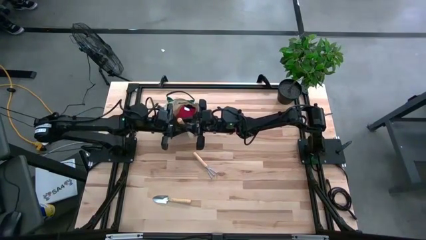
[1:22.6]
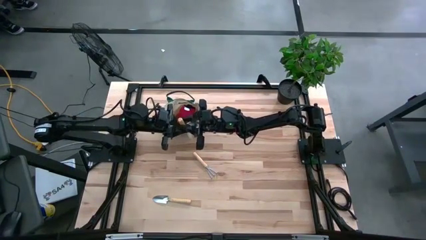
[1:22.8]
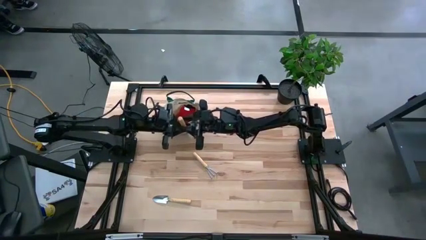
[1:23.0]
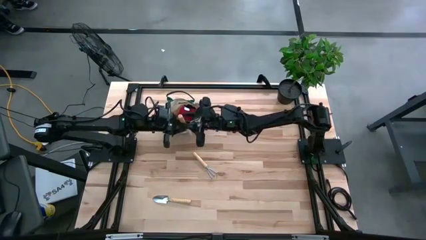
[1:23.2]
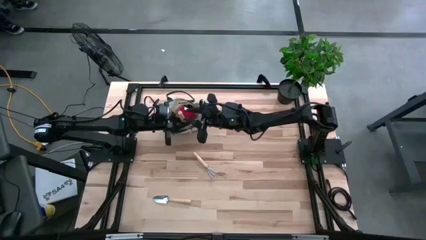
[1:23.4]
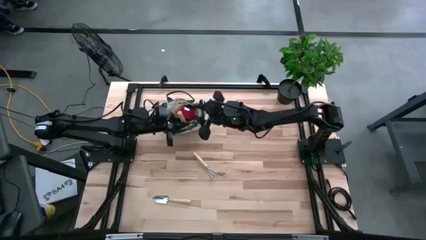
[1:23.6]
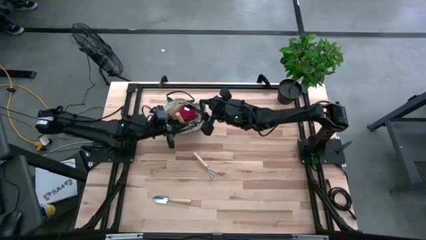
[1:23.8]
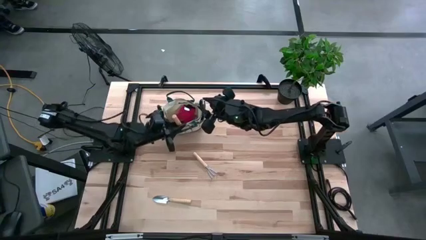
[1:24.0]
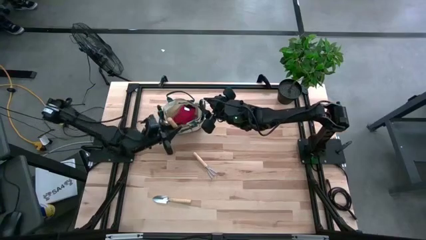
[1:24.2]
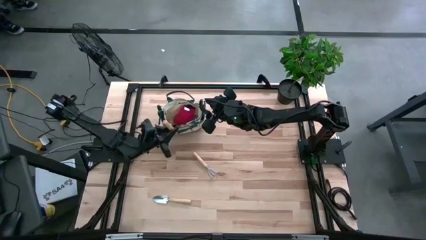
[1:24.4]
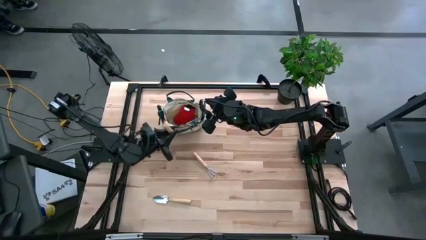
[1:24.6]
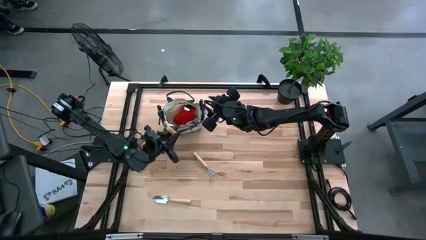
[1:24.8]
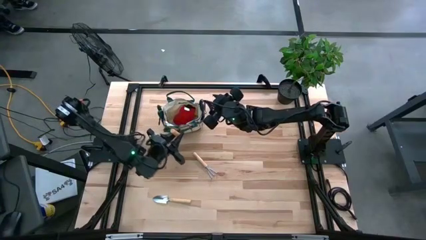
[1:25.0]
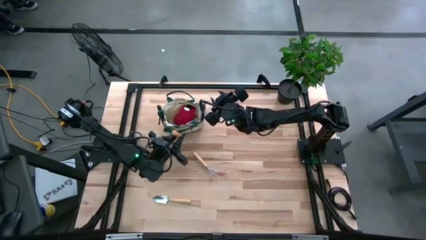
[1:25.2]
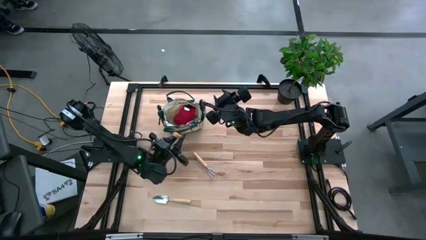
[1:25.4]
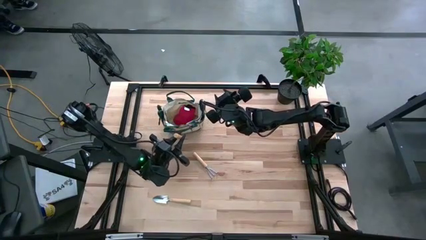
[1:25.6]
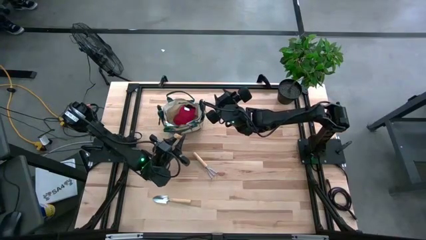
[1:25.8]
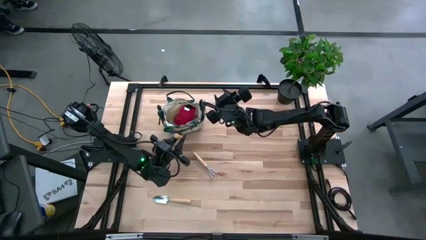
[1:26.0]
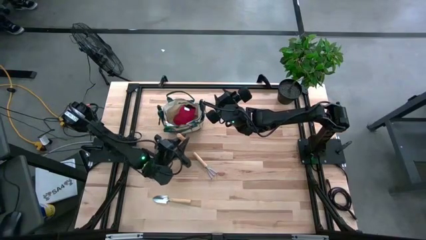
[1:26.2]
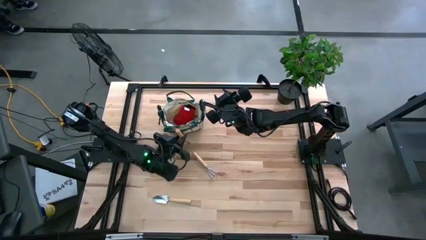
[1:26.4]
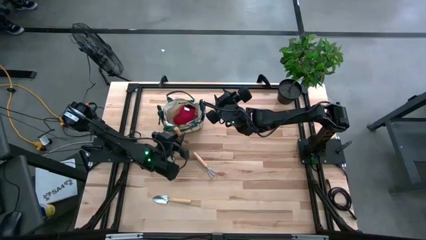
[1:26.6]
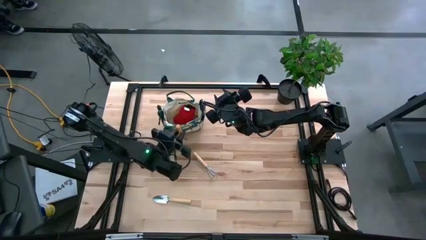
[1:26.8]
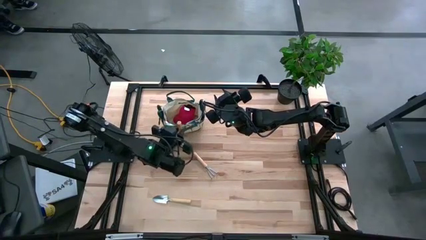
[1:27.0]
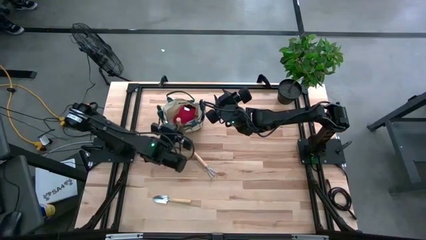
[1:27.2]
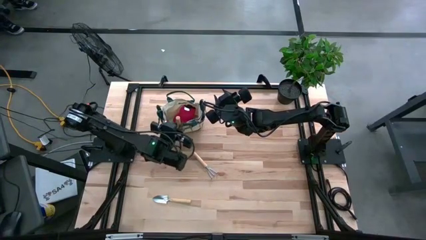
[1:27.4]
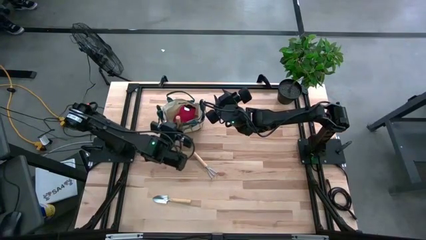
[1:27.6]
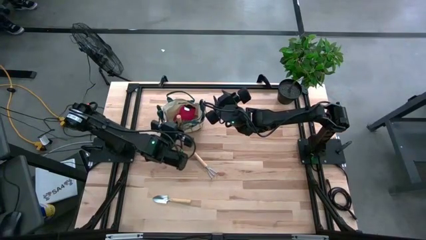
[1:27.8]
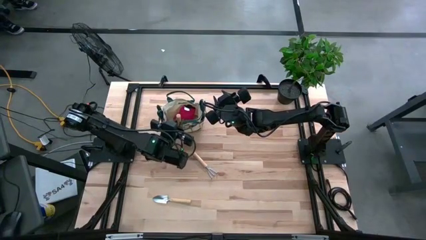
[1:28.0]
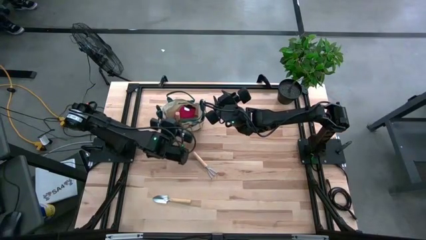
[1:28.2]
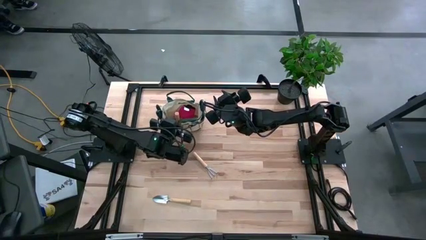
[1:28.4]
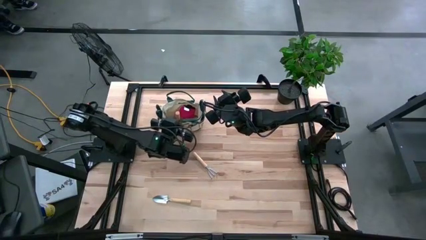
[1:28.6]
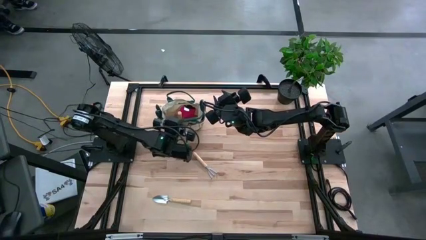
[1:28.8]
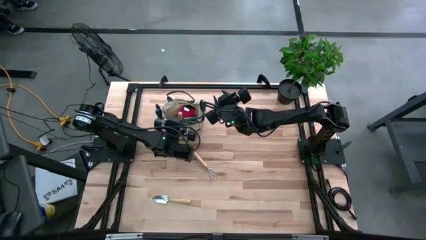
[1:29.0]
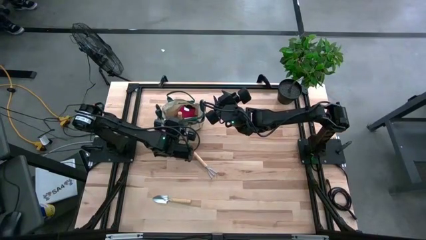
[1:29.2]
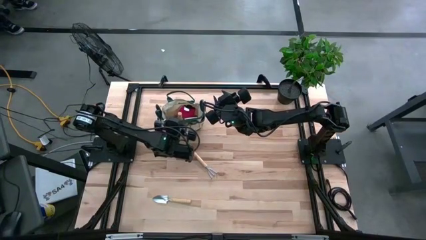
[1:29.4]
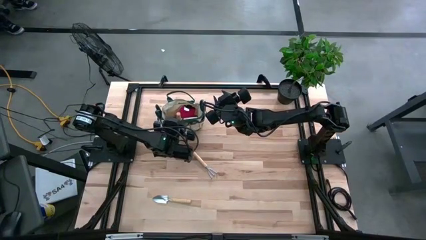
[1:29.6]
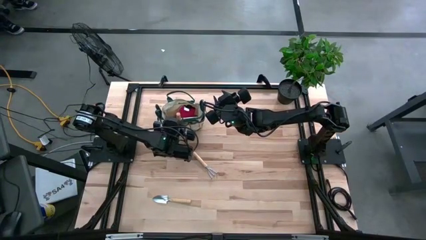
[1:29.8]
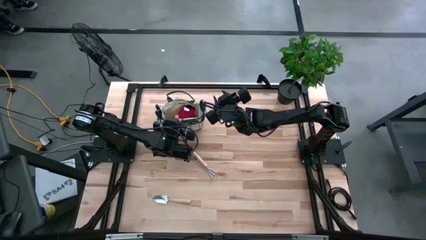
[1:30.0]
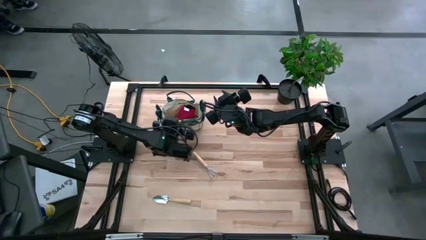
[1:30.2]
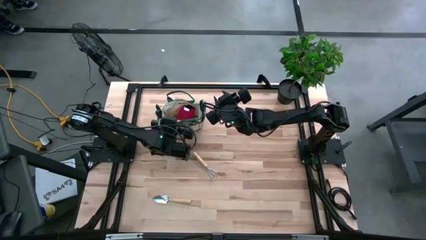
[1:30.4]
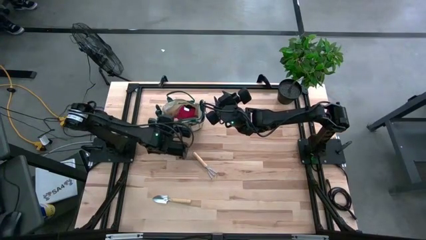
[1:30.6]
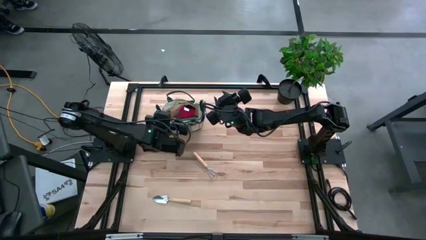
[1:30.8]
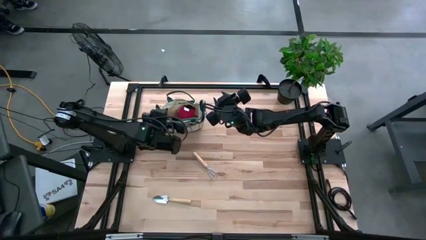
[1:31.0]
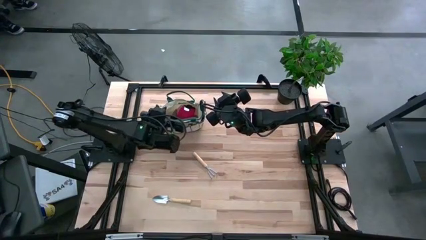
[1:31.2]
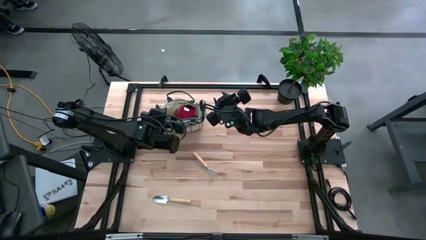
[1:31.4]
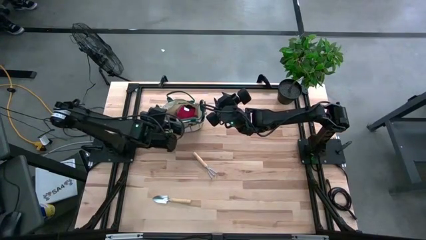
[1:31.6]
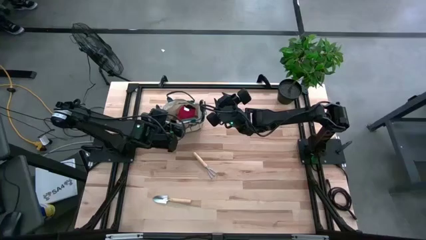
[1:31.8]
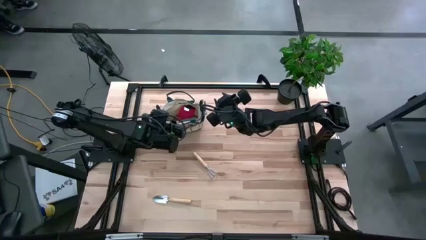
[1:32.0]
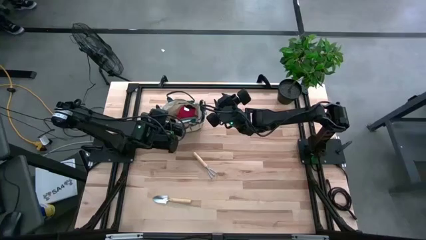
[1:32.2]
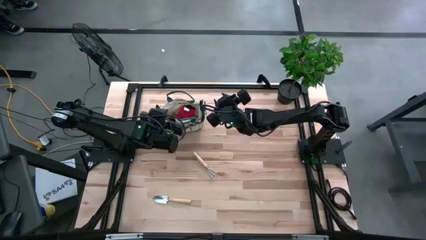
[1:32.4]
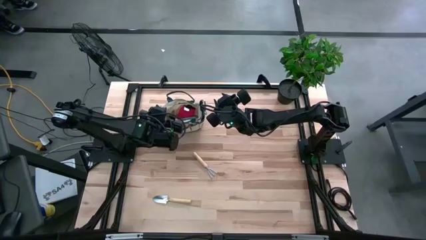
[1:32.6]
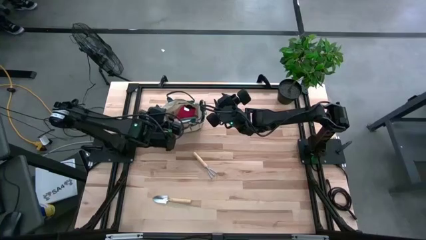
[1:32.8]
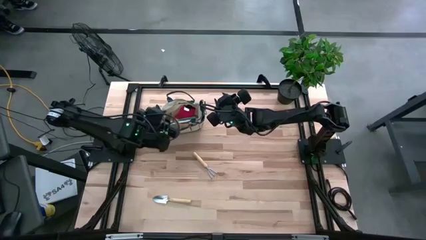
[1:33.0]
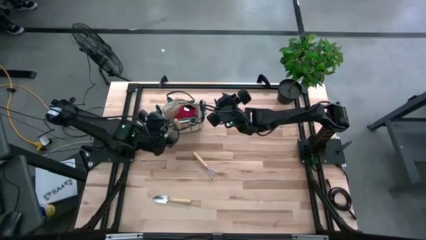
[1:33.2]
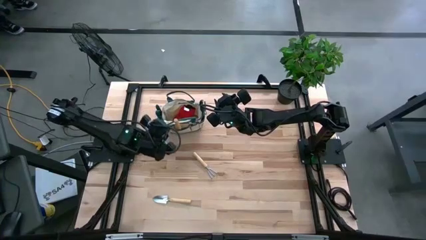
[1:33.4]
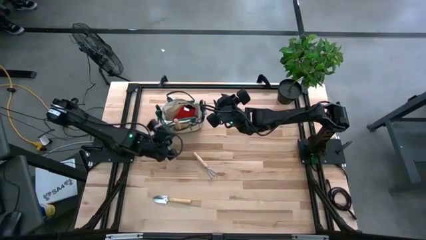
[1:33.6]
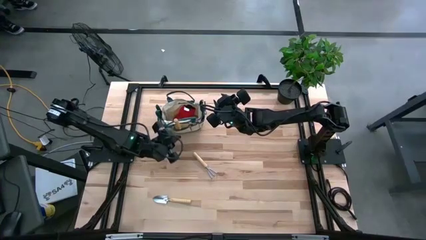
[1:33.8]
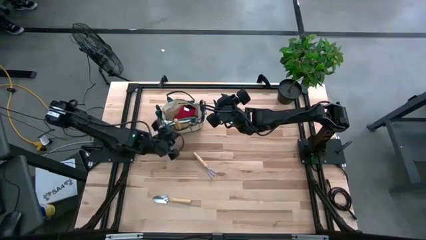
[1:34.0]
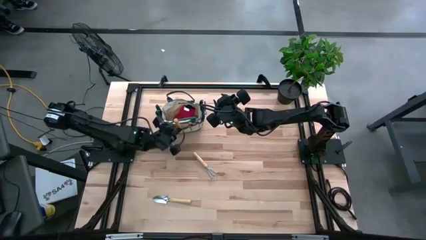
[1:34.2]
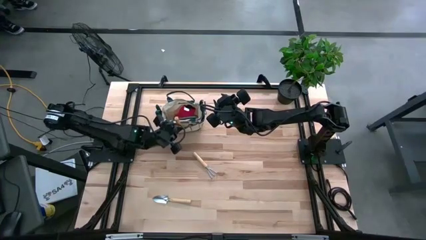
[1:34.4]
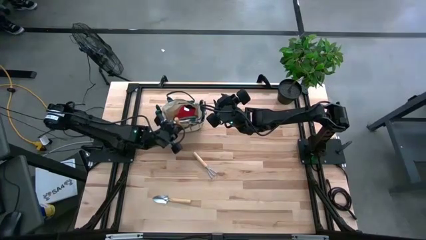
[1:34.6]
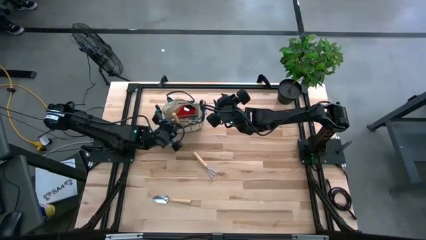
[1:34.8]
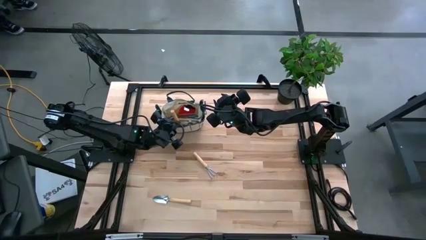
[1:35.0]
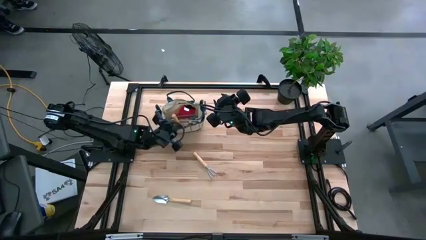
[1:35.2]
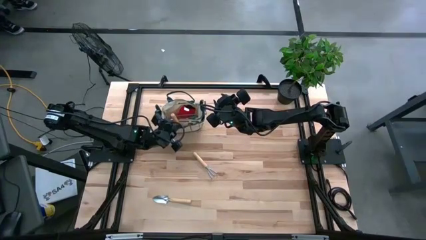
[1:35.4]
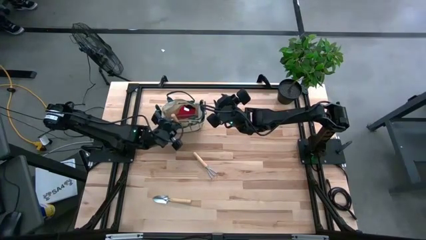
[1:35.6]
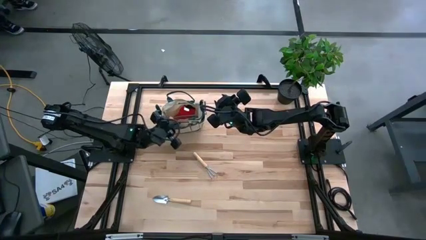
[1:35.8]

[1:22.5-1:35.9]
Task: Pick & Place Garden tools in Gardening bag
Put the brown trowel into the gardening bag
